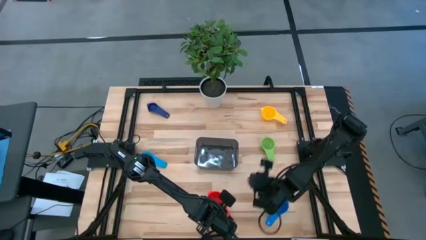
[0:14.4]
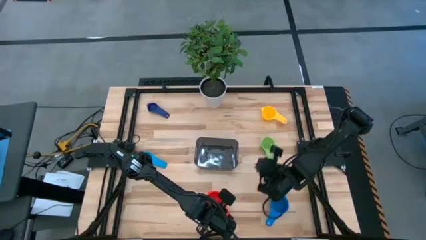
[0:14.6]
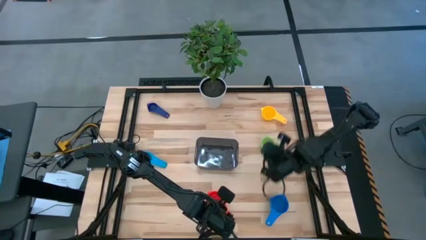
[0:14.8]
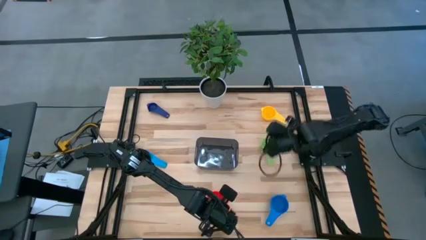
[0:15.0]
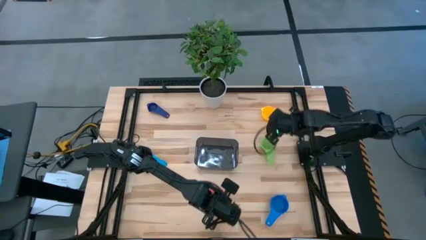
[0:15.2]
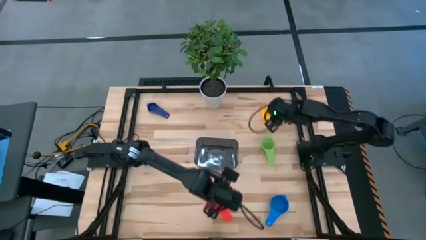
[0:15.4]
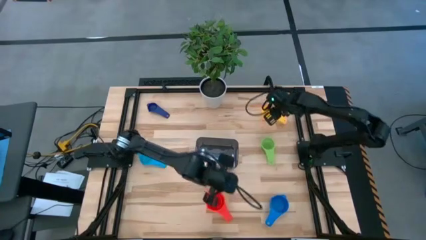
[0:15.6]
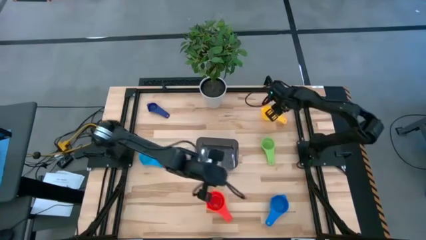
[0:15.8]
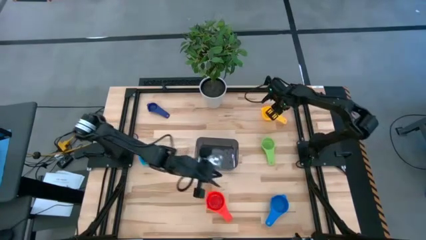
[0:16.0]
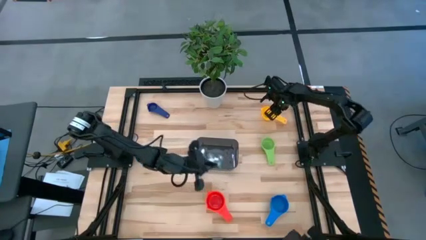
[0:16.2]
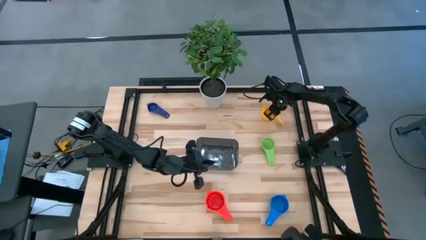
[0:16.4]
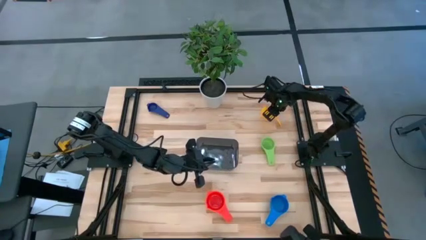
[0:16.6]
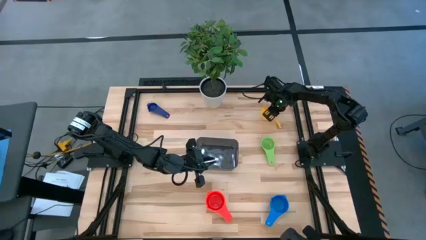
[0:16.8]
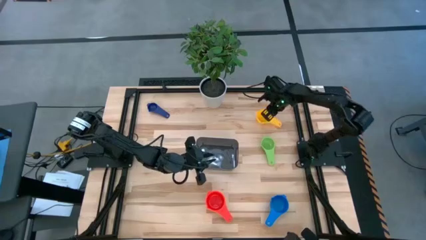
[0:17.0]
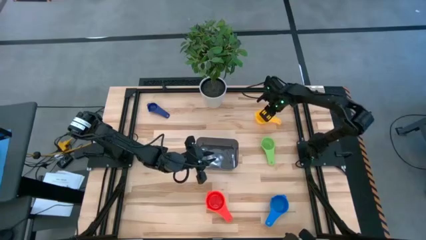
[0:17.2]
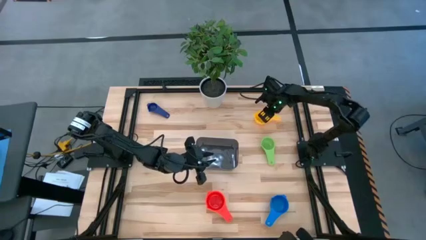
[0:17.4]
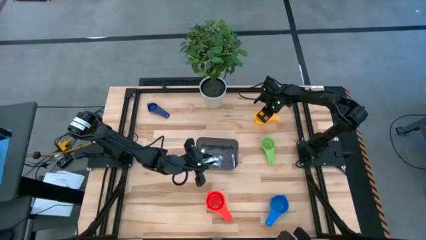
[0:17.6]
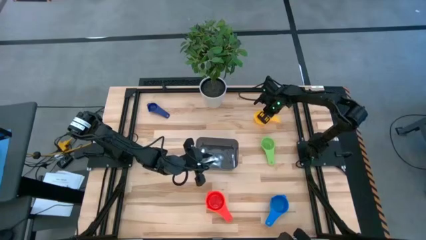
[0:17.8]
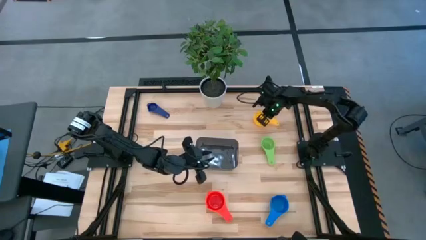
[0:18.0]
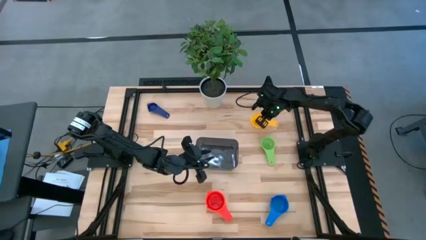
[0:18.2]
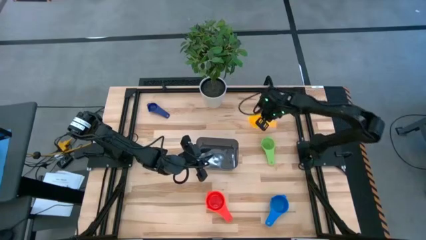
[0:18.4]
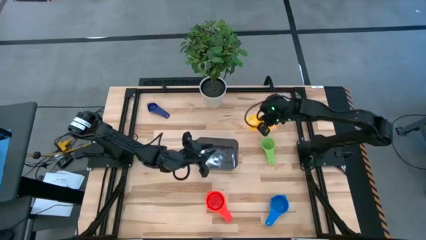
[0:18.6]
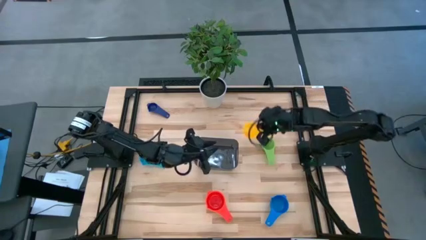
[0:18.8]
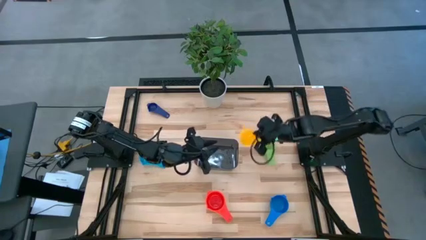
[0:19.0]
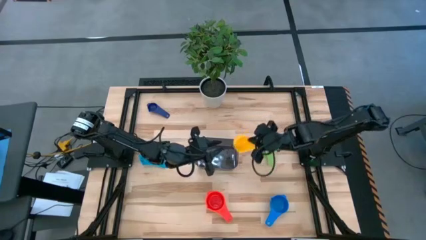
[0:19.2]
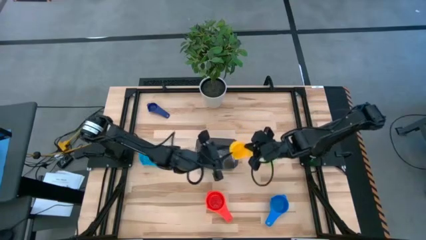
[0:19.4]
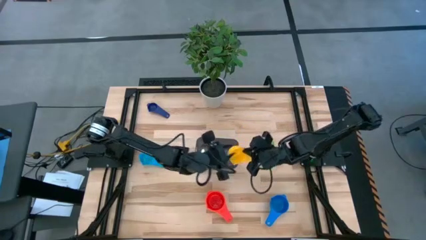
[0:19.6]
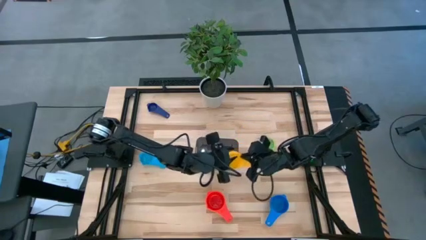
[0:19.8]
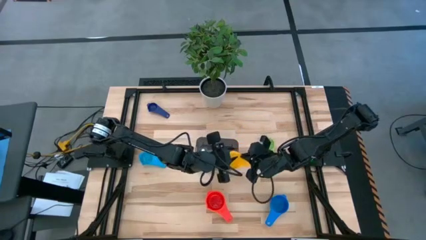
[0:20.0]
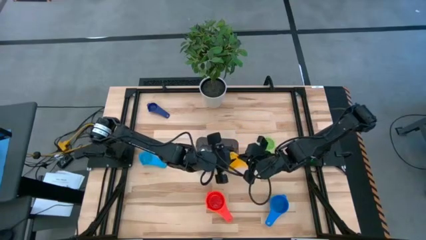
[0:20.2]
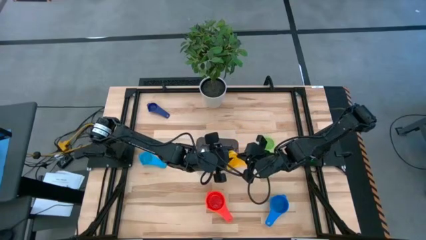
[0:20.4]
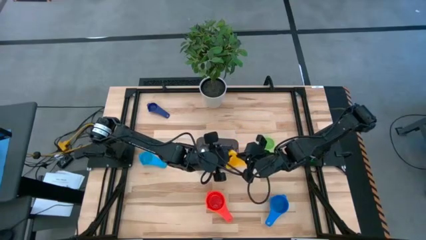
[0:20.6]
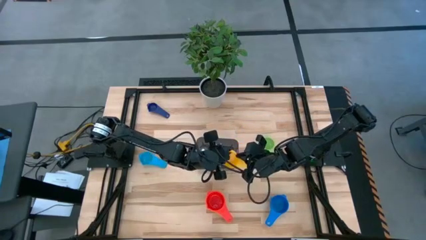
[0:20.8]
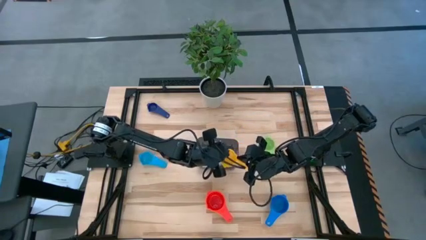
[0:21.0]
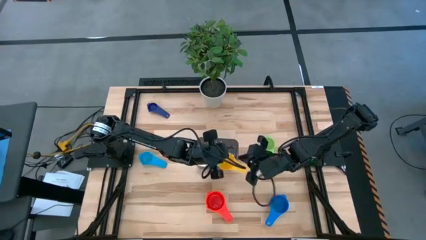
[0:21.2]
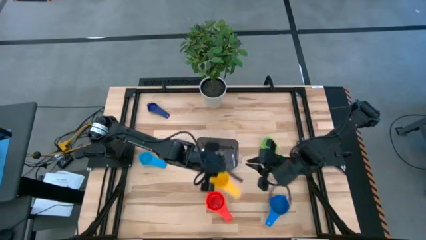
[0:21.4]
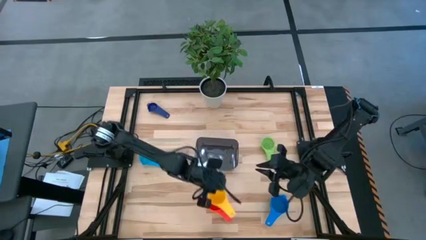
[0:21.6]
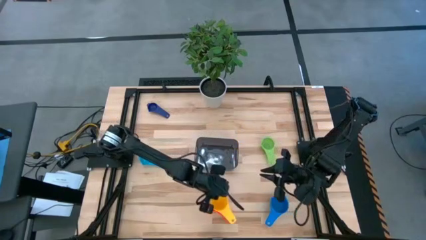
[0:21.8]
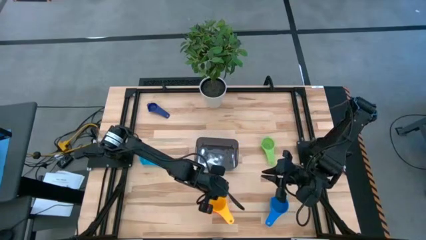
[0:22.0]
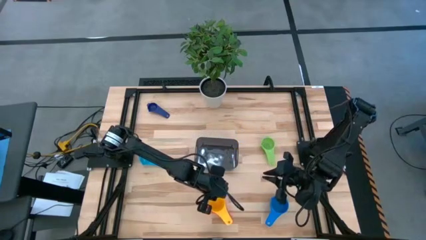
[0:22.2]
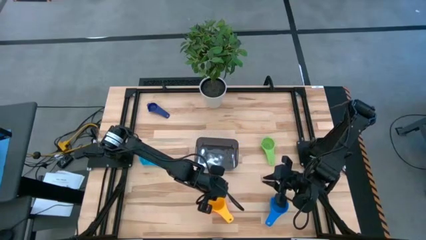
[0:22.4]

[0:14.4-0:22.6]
Task: Nest measuring cups in basket
Stack the yellow measuring cup on the top of the red measuring cup

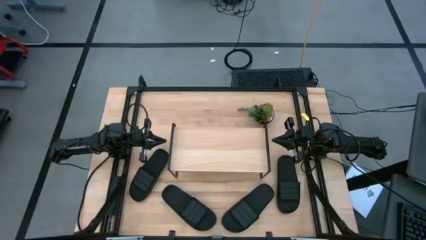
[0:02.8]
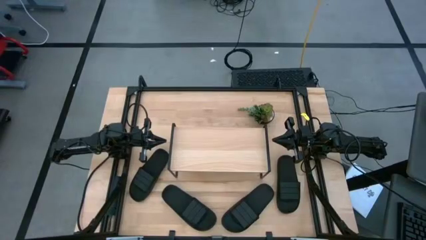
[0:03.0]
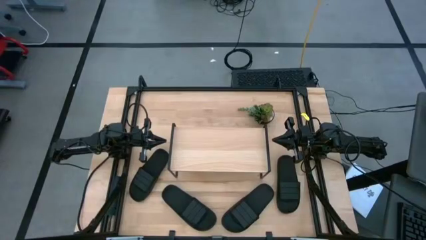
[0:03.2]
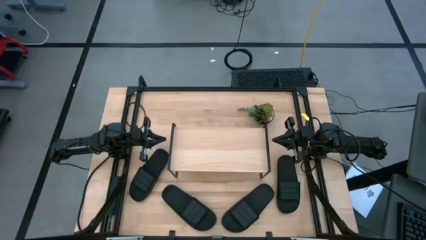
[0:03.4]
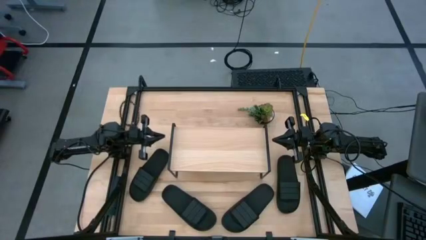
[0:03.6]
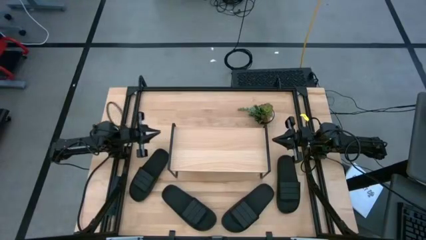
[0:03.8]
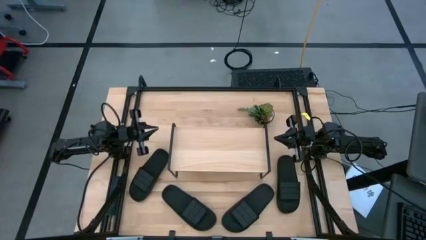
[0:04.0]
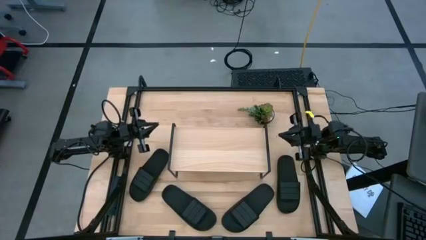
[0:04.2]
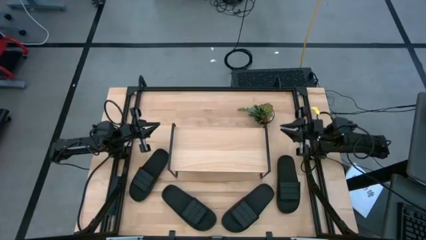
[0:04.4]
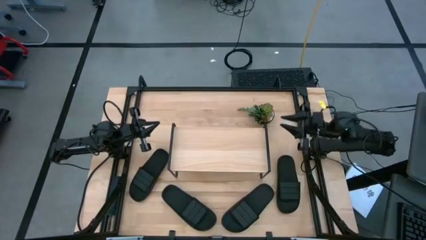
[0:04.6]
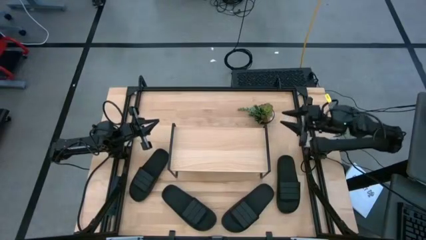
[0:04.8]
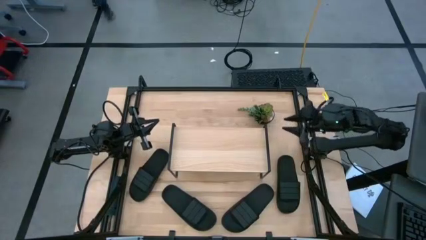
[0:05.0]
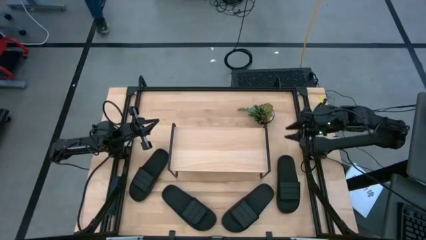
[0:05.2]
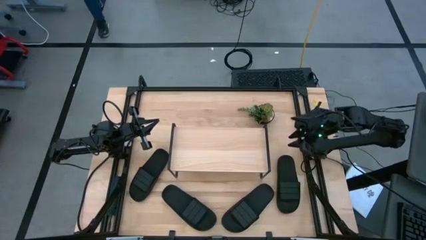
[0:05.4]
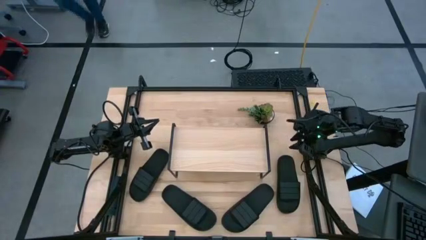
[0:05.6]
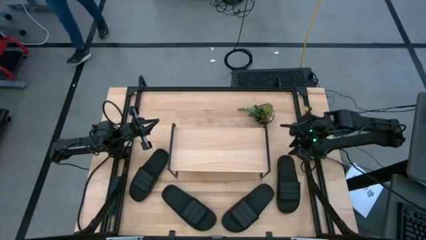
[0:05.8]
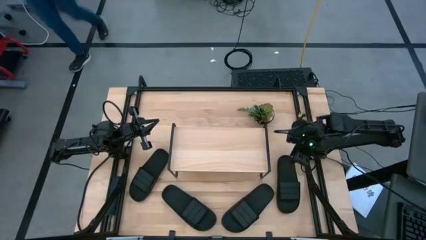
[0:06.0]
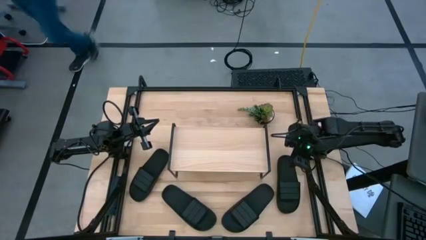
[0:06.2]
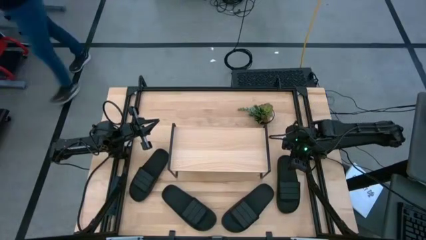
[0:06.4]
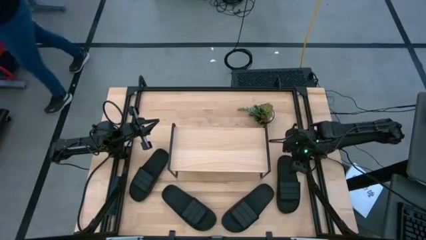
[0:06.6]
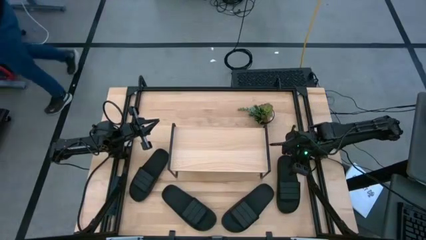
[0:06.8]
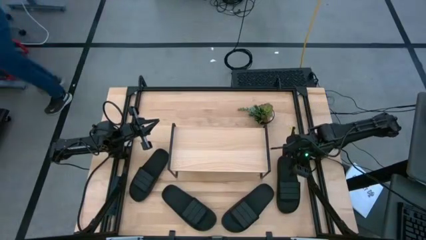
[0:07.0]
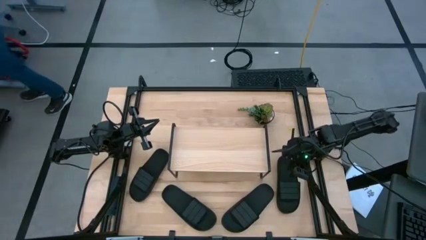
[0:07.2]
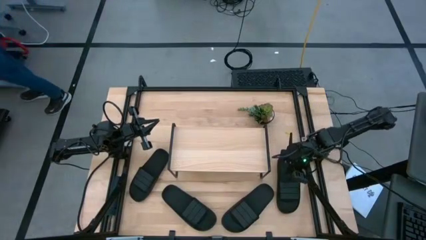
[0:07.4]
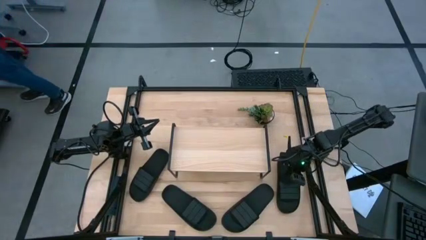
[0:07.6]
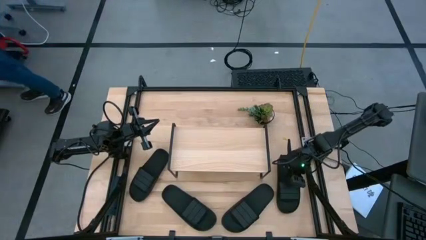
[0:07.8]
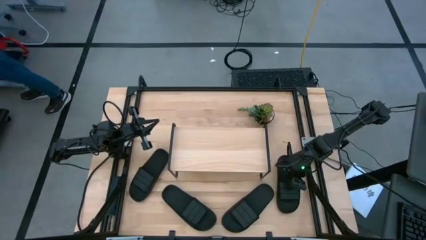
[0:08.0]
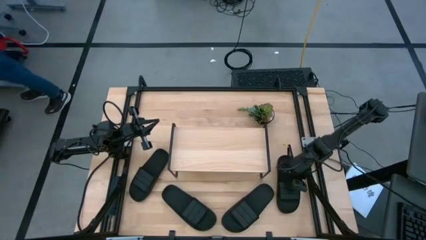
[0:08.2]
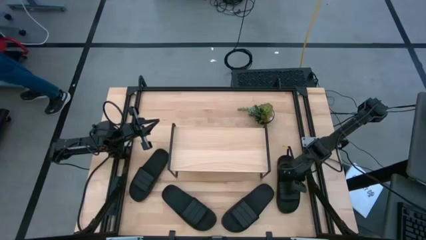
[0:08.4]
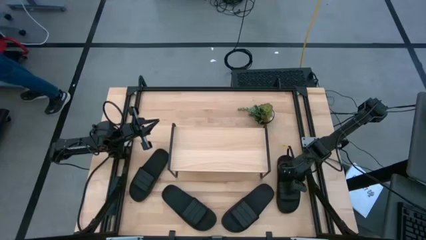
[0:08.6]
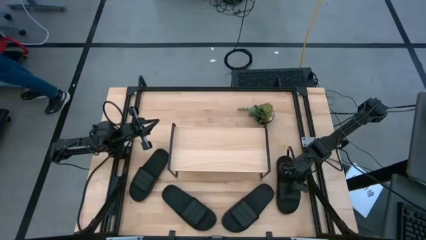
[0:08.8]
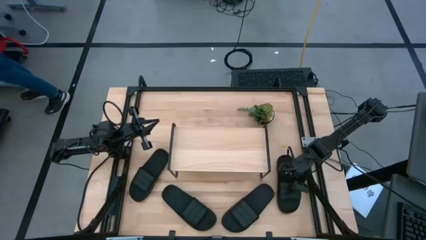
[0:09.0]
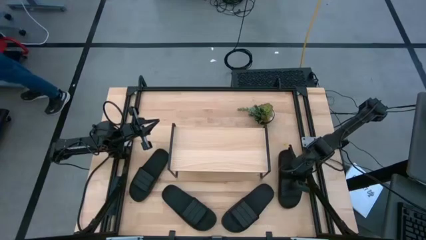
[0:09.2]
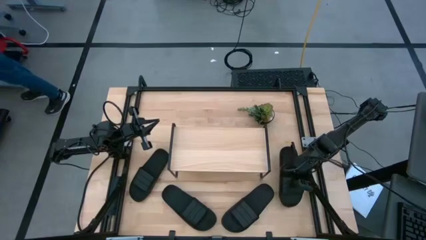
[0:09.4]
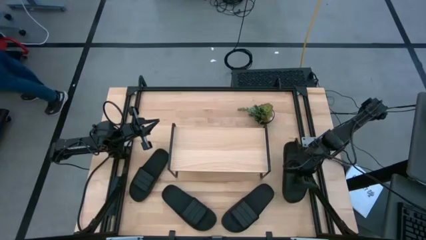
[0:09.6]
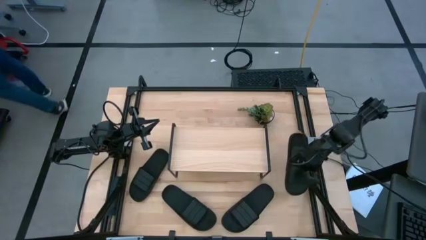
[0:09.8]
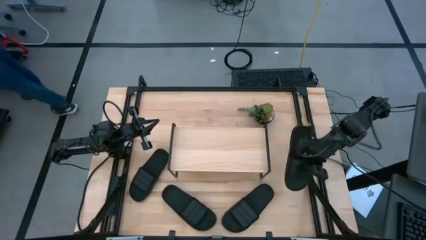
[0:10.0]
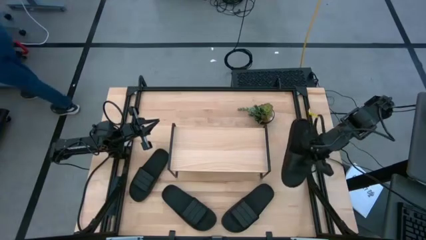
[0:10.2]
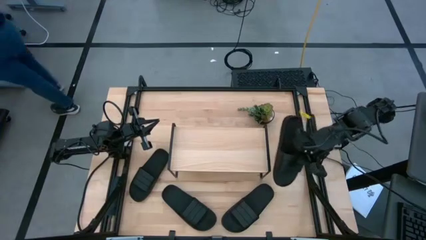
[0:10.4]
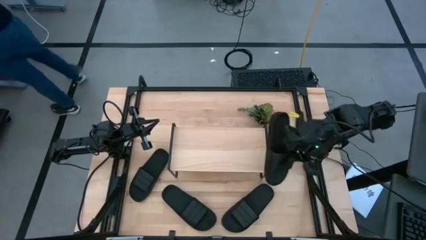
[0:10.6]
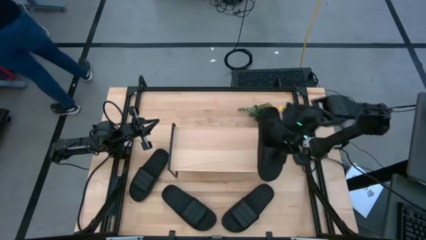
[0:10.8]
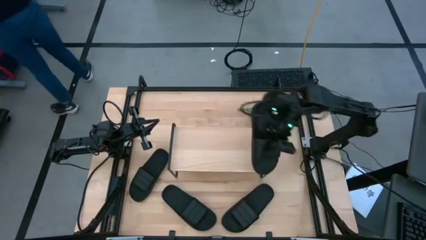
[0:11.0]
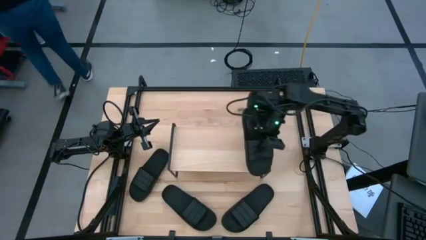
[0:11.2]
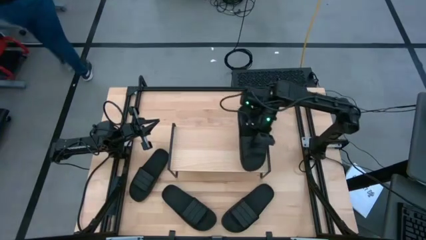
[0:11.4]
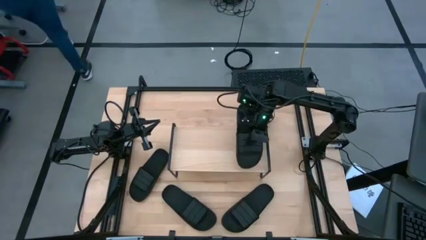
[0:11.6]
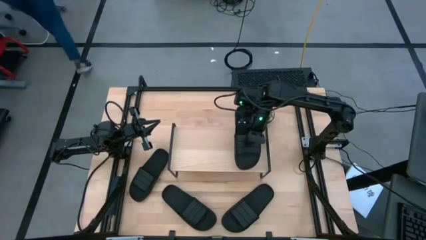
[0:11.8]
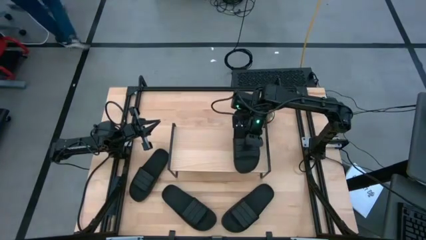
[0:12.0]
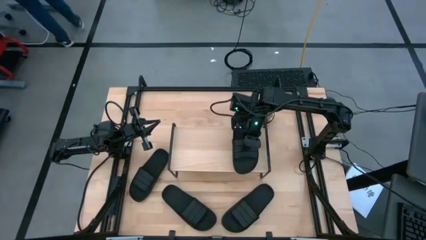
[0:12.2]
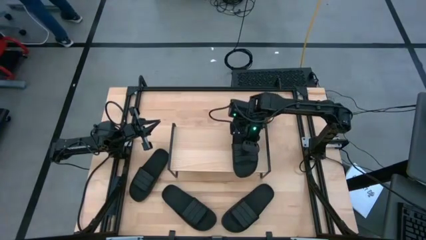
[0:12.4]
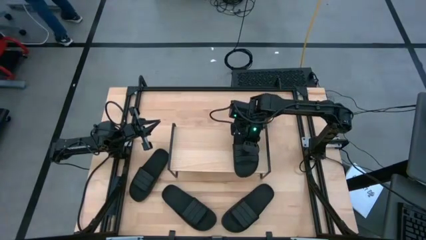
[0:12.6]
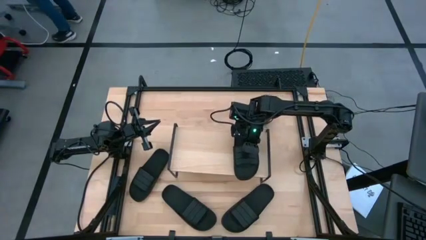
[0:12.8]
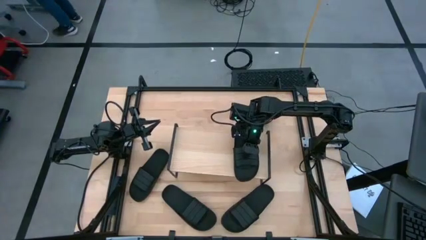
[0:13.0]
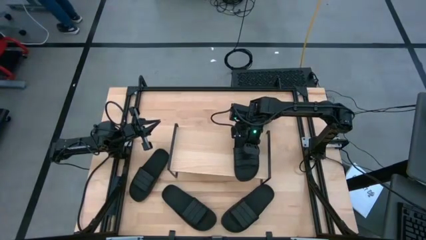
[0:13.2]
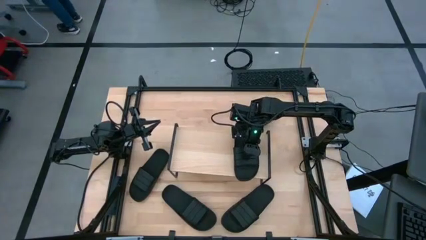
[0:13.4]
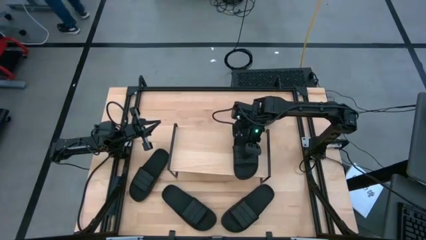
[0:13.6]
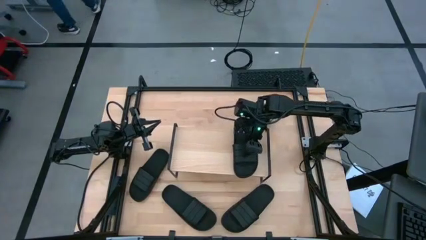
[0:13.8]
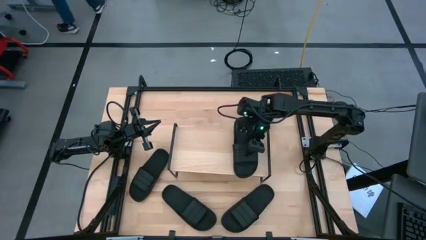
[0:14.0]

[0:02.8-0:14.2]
Task: Pick and place slides into the shelf
Put the black slide on the shelf
